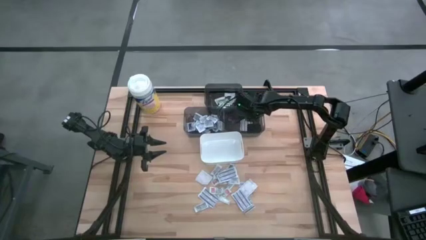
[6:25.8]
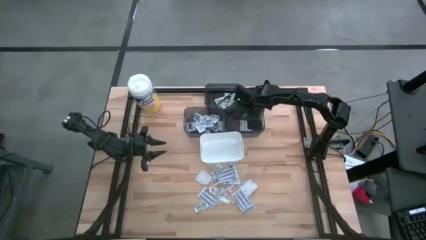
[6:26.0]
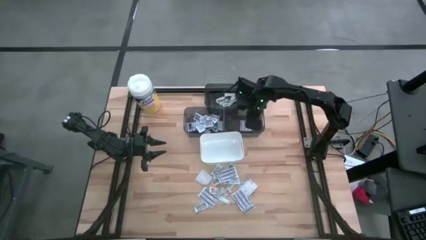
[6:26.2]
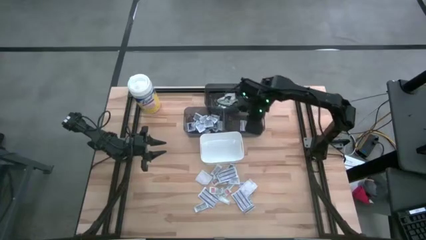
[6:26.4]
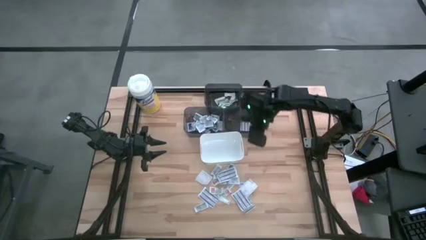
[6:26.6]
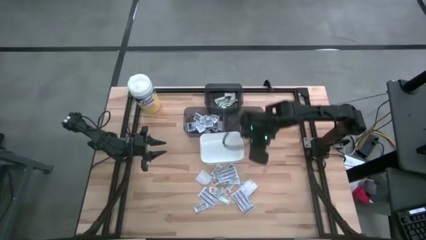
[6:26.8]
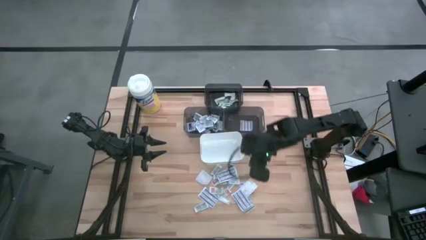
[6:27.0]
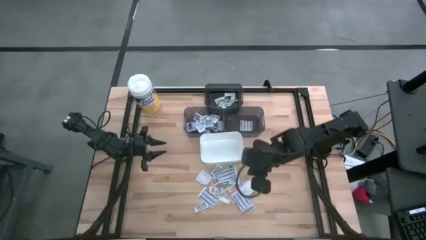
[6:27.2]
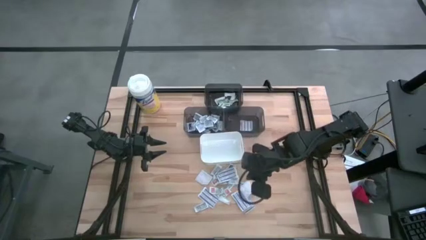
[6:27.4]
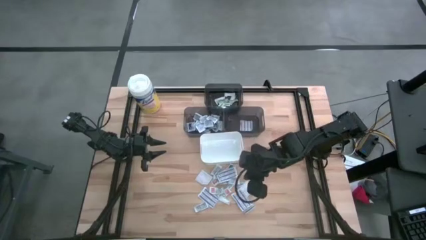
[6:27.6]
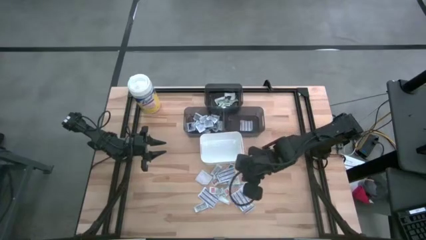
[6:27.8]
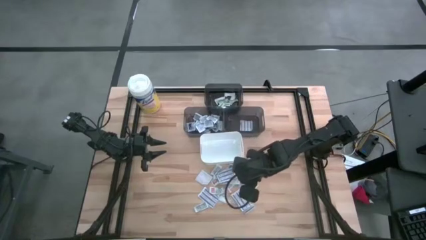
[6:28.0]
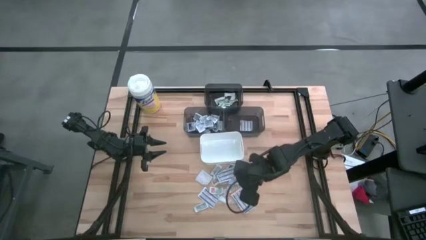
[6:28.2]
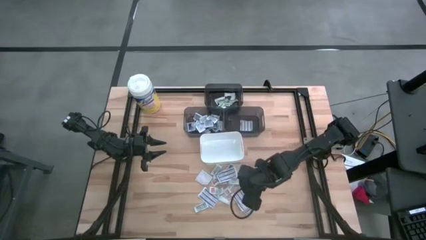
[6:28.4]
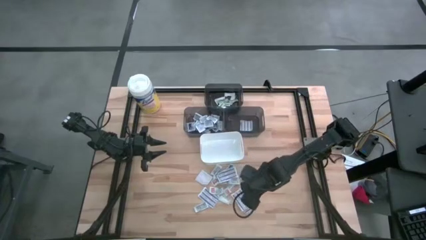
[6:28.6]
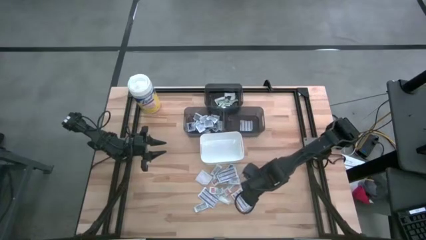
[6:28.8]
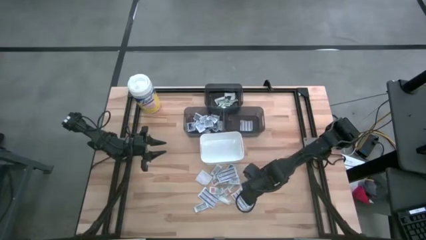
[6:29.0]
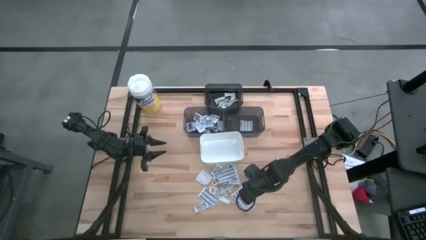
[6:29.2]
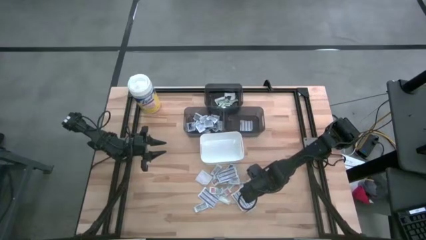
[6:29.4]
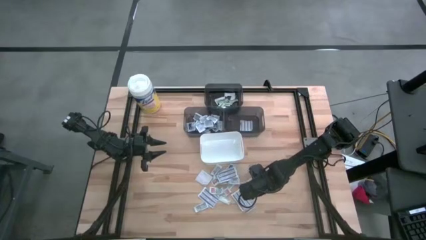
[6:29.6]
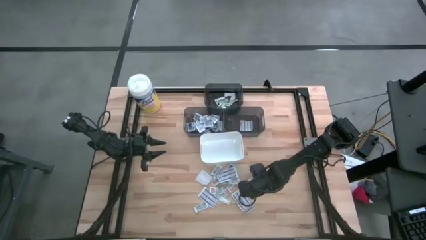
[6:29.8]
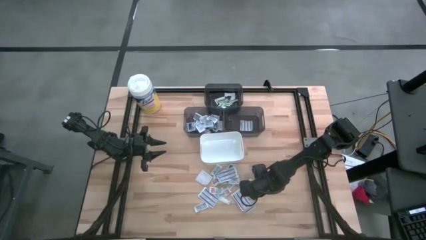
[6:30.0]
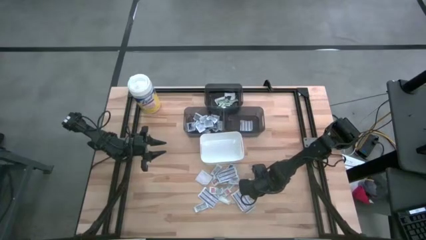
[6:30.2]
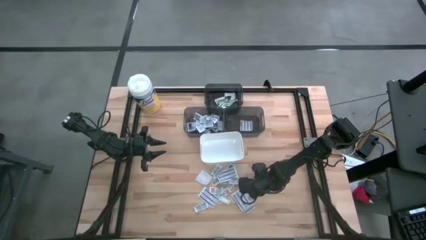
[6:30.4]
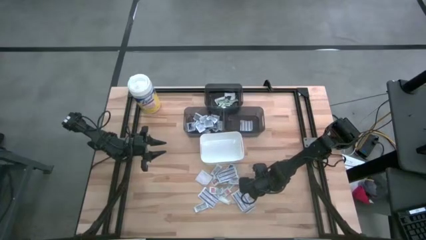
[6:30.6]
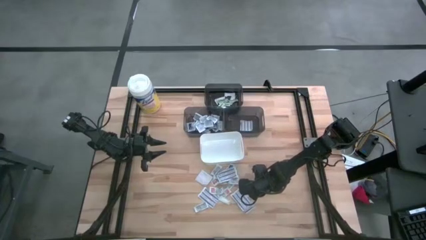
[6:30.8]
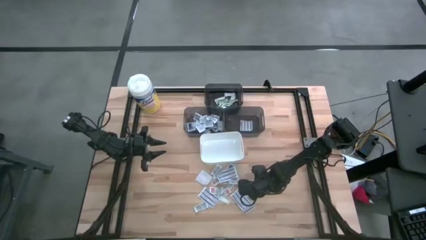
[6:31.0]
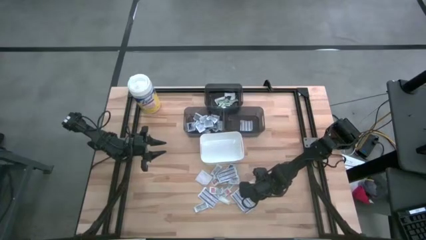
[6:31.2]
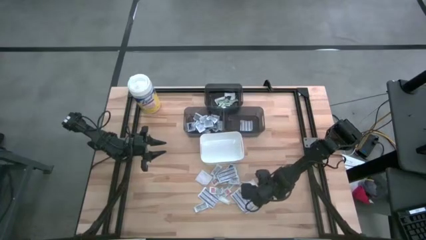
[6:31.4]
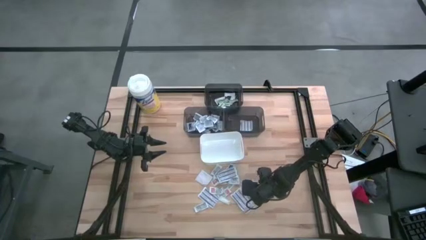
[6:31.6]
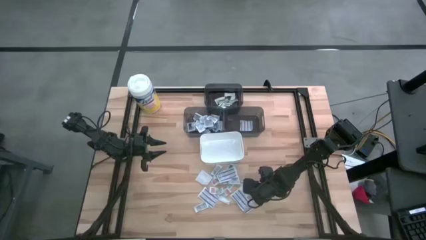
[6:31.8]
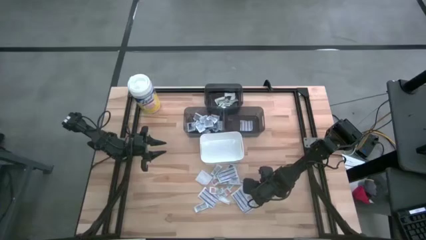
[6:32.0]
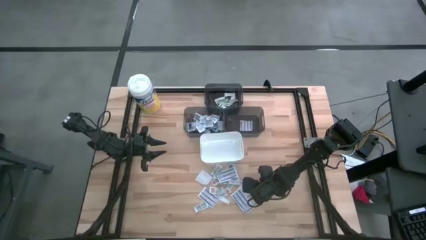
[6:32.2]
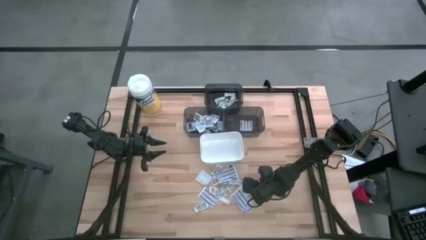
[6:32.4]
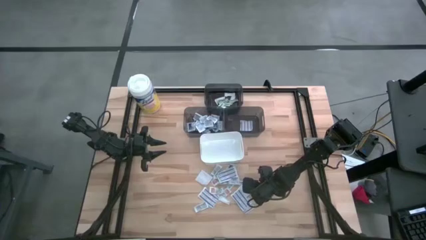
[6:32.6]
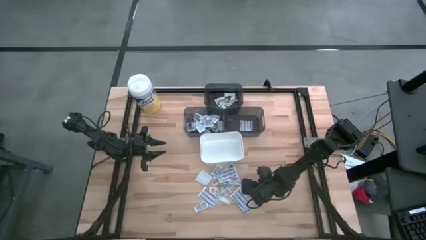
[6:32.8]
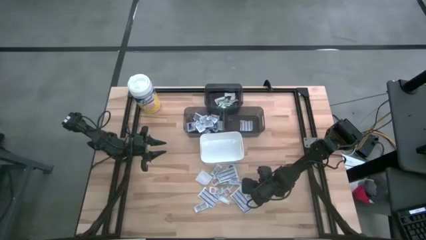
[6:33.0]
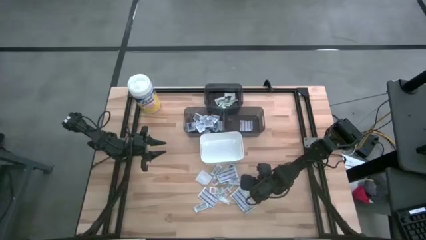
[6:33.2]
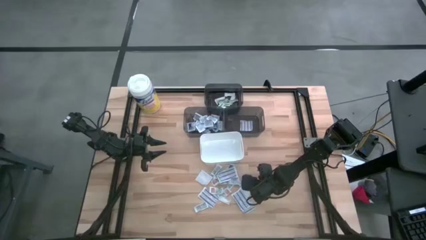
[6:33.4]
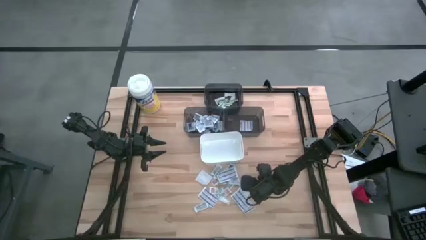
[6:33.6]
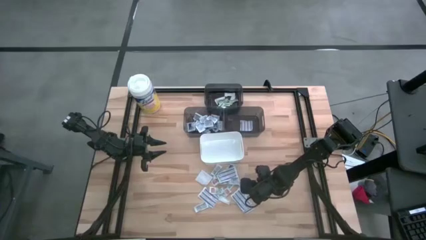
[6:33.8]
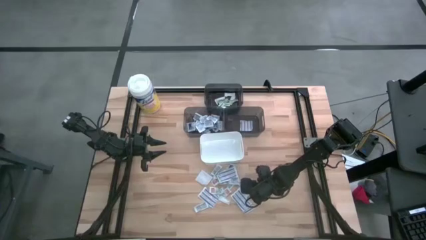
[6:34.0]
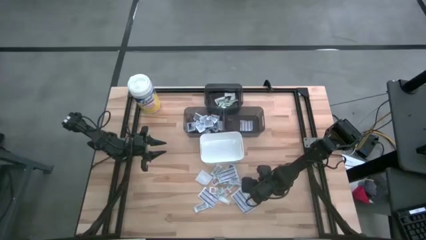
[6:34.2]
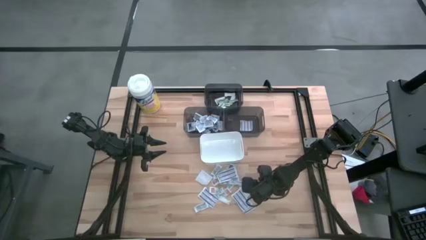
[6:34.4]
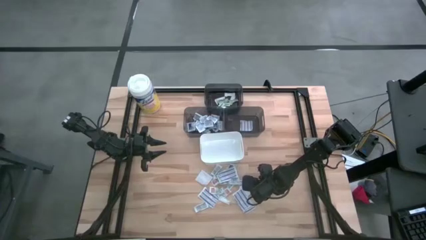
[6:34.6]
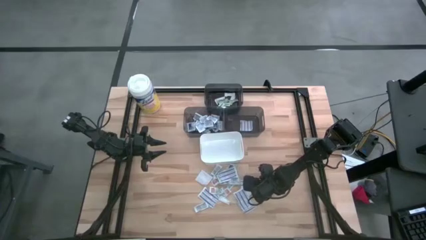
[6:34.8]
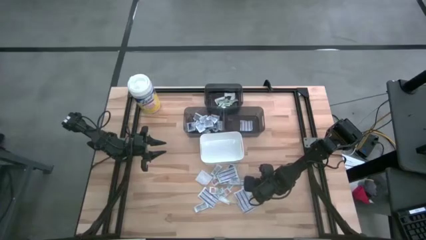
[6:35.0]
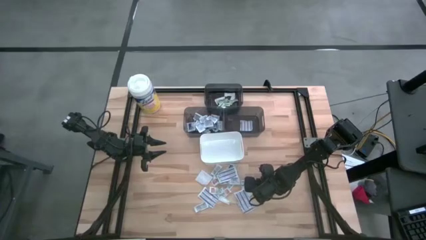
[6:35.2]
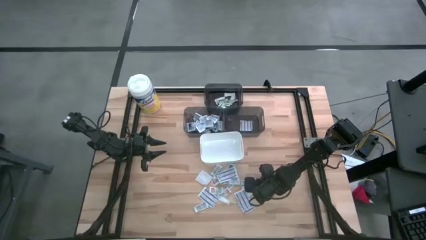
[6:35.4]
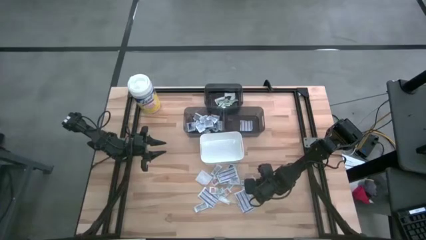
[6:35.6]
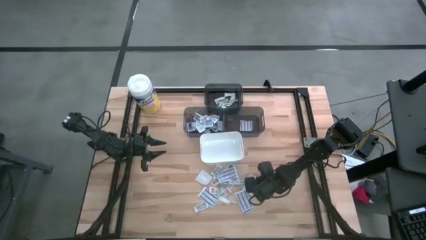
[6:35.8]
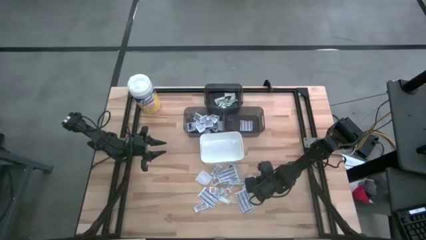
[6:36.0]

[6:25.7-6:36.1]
Task: Pick & Place First Aid Supplies
Put the blue bandage into the right black bin

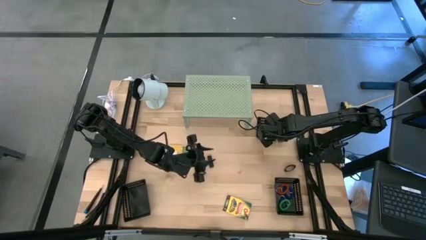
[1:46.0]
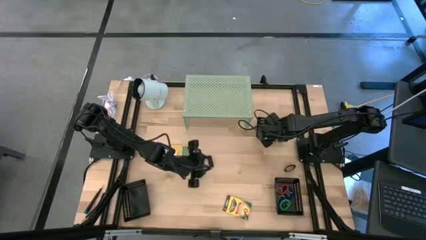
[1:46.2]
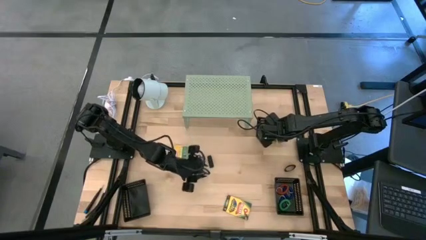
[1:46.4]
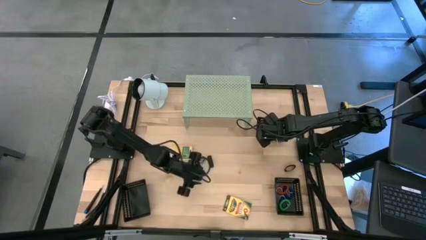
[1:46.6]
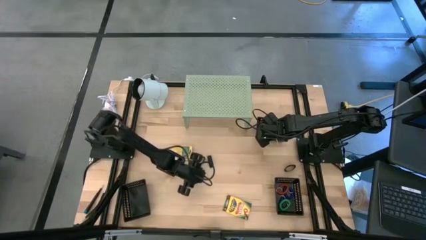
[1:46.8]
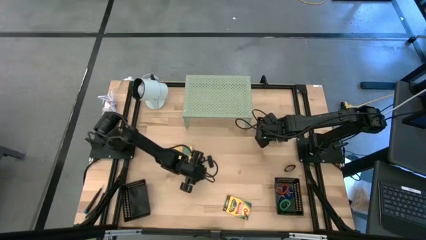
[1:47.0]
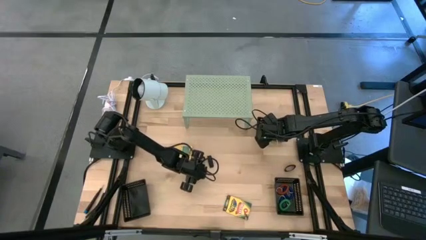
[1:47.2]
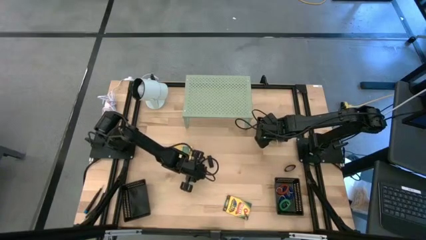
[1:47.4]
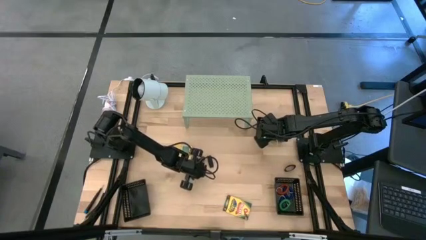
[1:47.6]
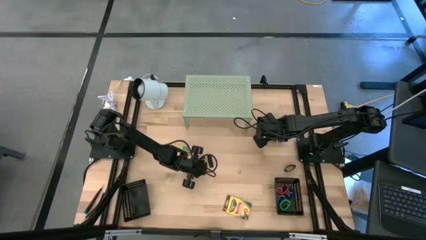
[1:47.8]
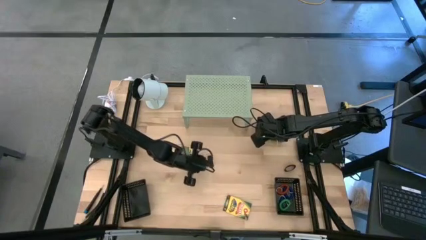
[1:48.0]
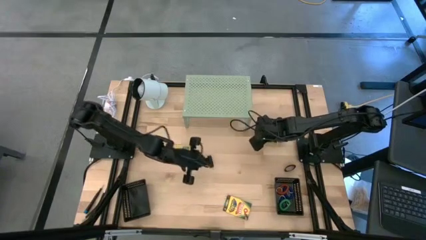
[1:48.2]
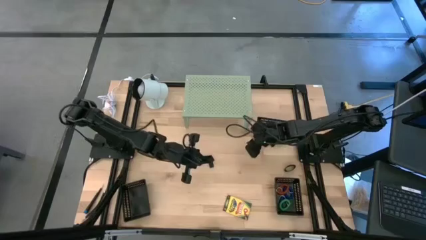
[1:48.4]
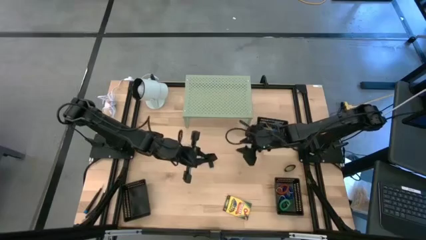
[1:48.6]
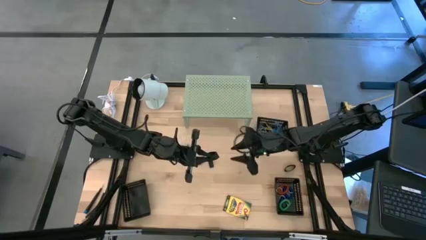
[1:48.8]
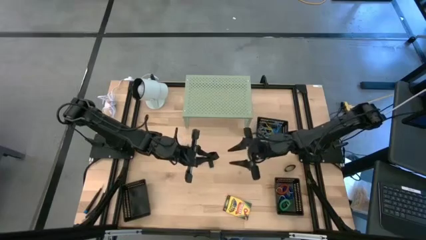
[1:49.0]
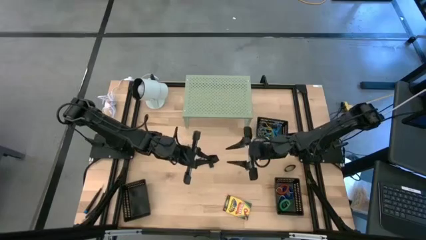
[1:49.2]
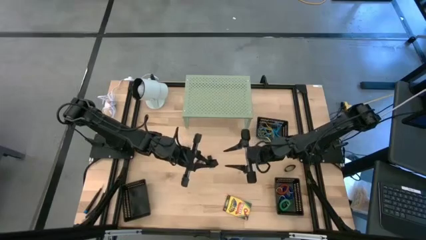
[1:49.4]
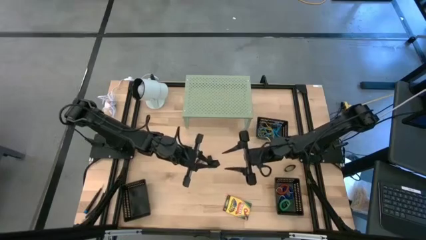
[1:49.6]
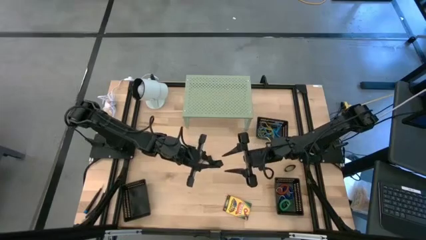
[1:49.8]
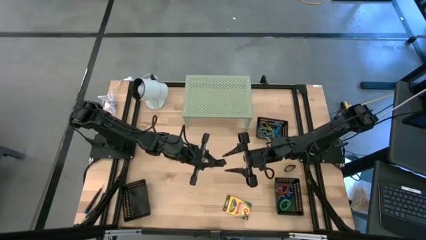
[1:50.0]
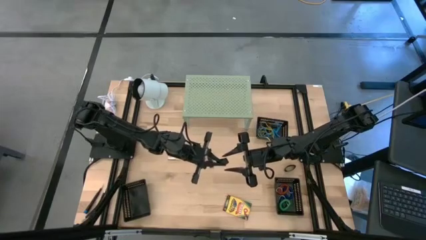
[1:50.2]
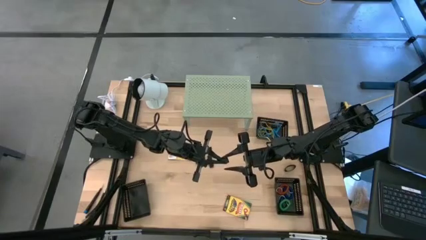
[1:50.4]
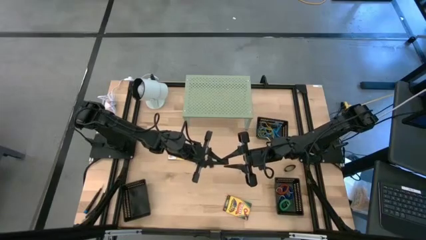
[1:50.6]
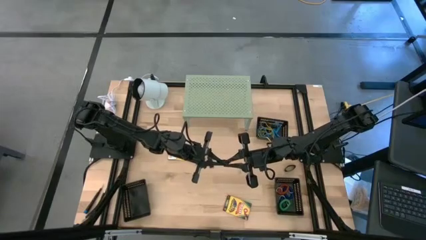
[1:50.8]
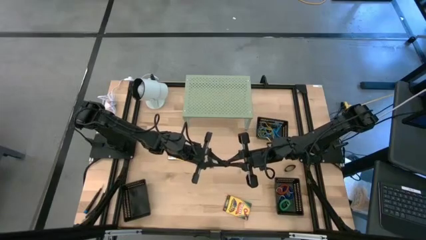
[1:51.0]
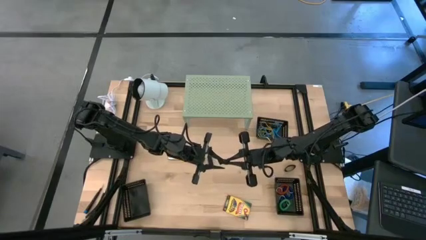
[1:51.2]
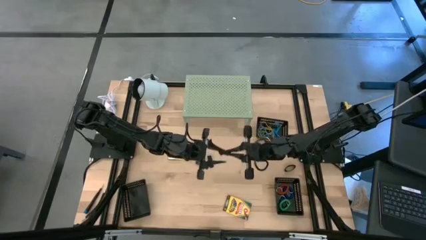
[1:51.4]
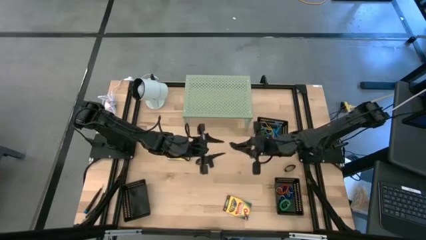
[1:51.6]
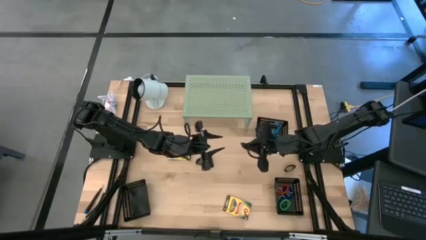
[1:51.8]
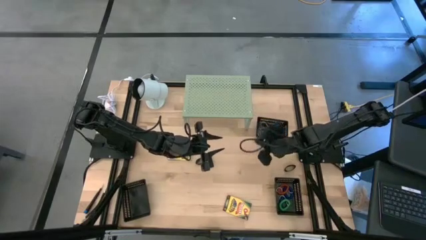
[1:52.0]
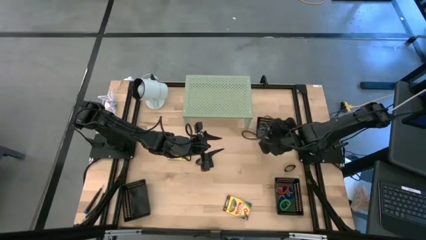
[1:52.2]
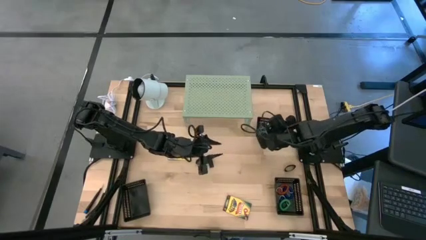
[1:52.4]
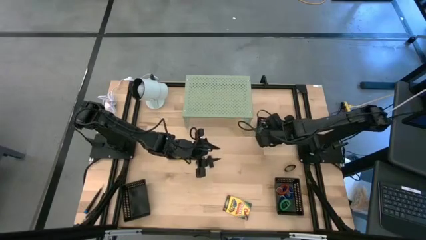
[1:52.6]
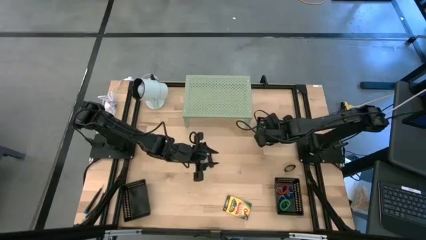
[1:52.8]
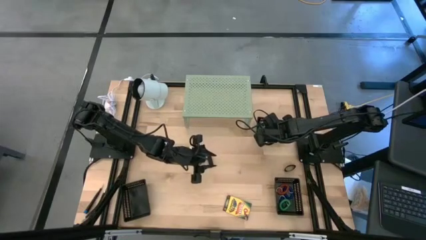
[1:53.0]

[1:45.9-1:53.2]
Task: Pick & Place Office Desk Supplies
Put the black rubber band into the top right black bin
